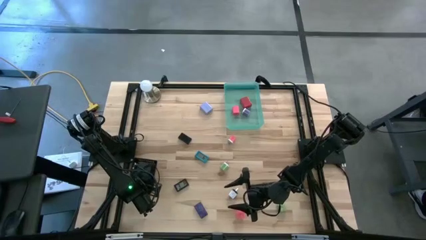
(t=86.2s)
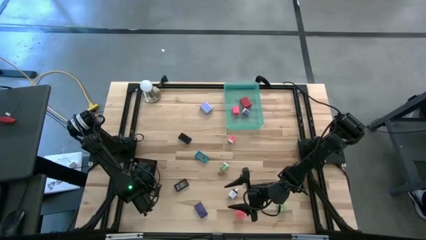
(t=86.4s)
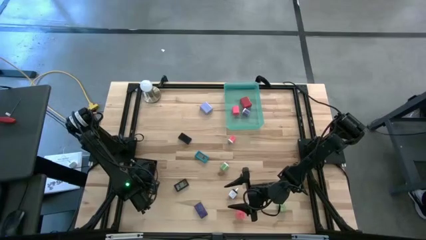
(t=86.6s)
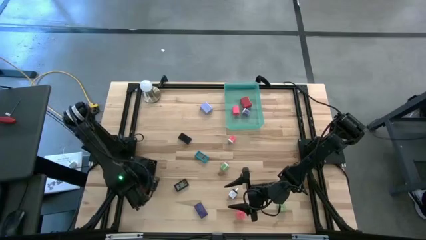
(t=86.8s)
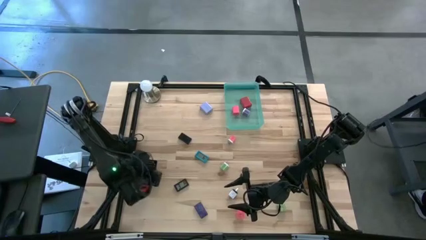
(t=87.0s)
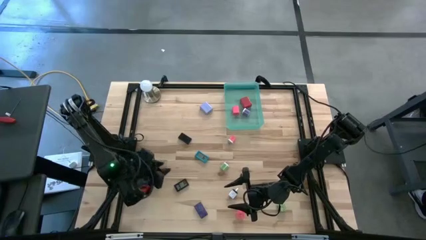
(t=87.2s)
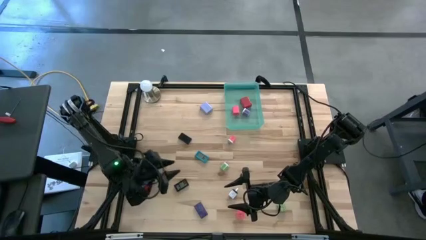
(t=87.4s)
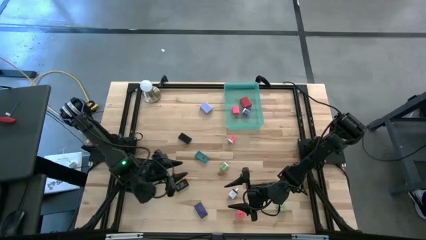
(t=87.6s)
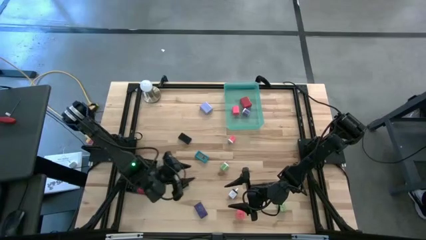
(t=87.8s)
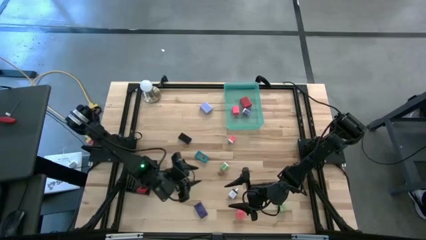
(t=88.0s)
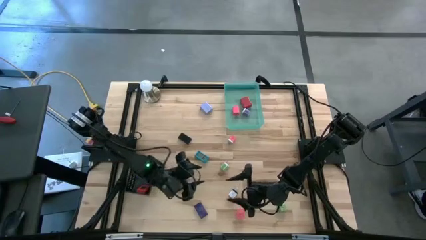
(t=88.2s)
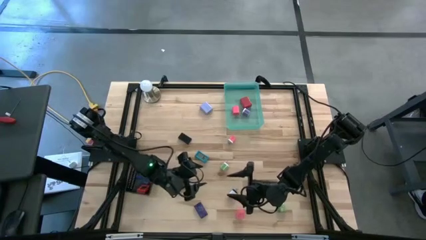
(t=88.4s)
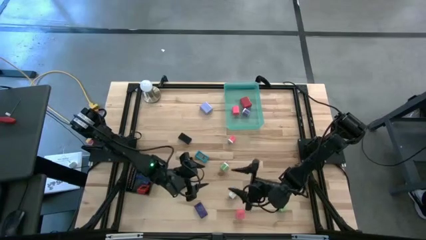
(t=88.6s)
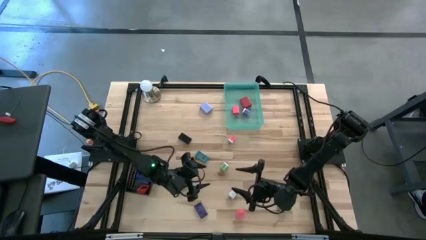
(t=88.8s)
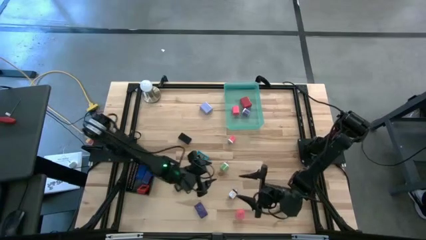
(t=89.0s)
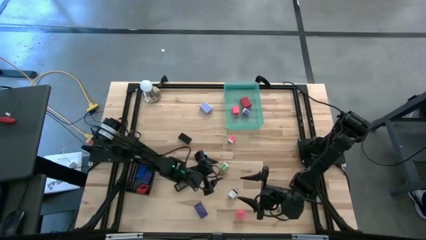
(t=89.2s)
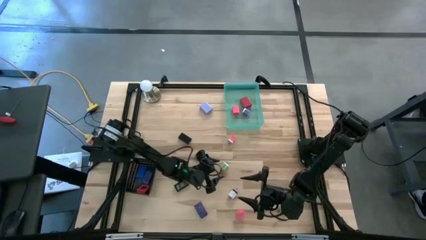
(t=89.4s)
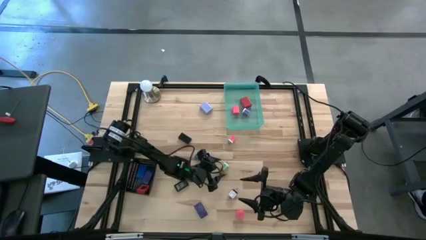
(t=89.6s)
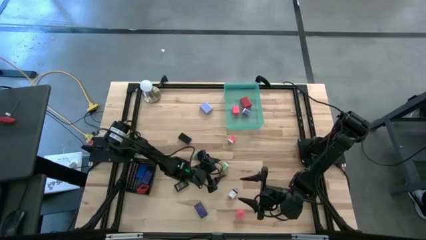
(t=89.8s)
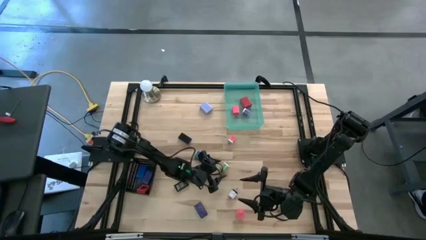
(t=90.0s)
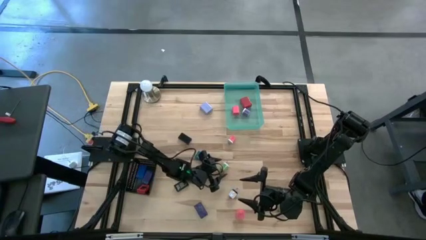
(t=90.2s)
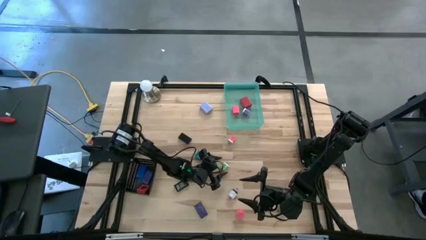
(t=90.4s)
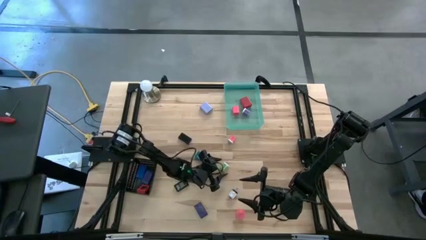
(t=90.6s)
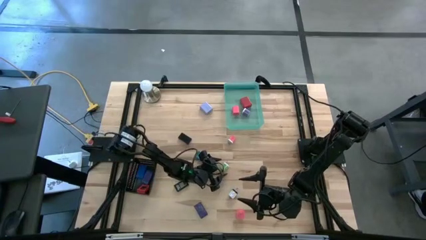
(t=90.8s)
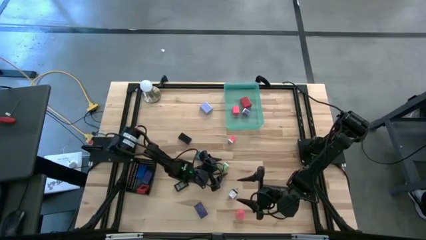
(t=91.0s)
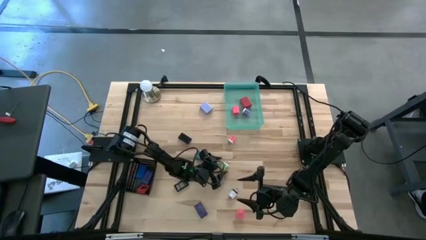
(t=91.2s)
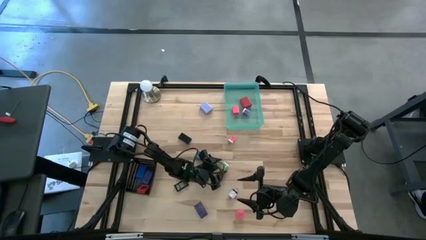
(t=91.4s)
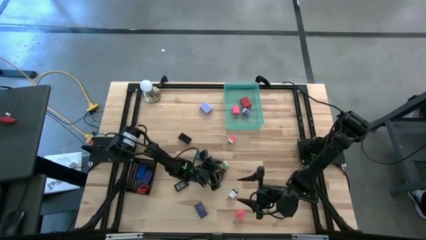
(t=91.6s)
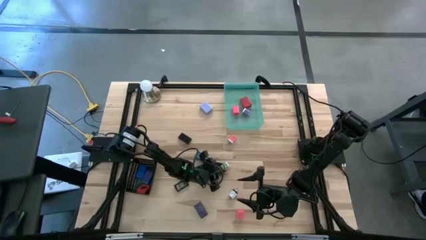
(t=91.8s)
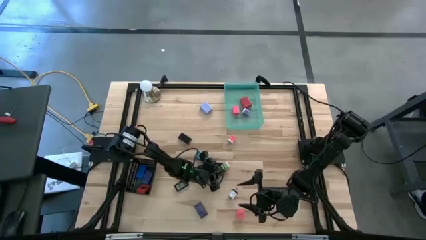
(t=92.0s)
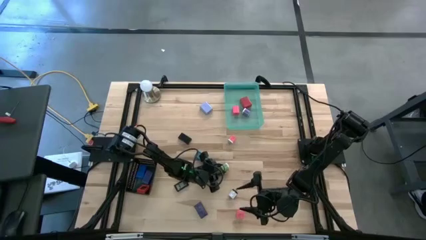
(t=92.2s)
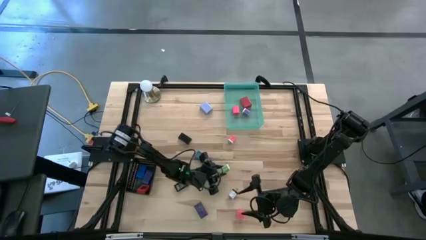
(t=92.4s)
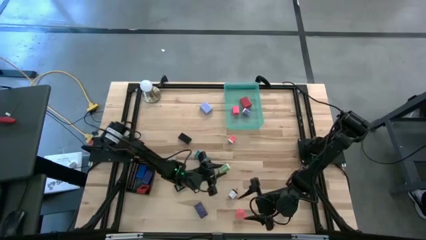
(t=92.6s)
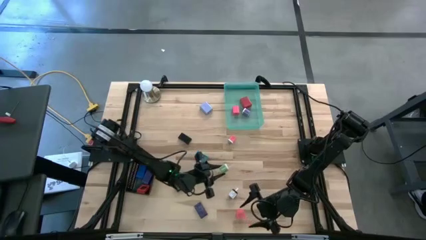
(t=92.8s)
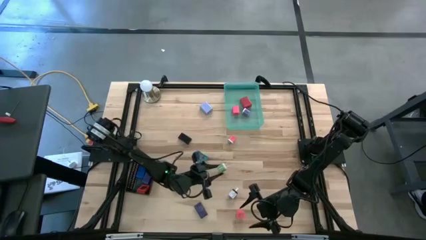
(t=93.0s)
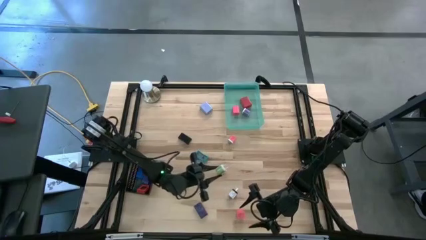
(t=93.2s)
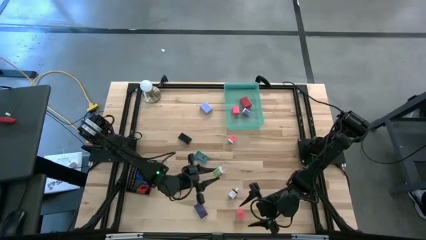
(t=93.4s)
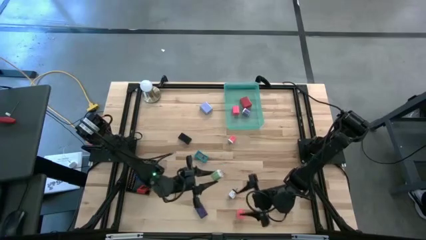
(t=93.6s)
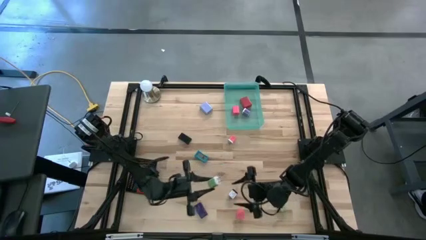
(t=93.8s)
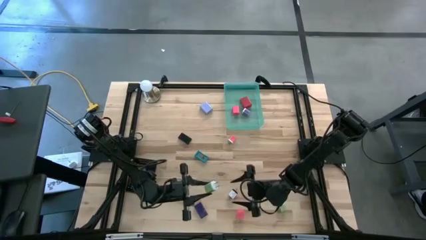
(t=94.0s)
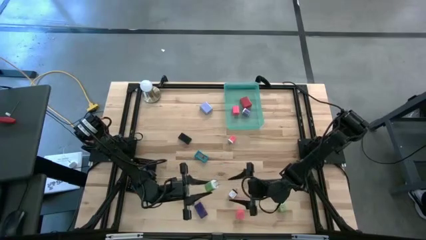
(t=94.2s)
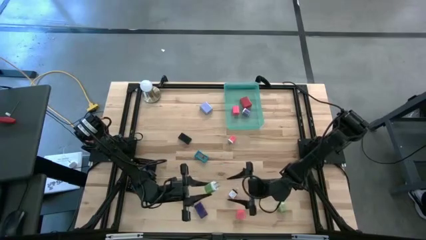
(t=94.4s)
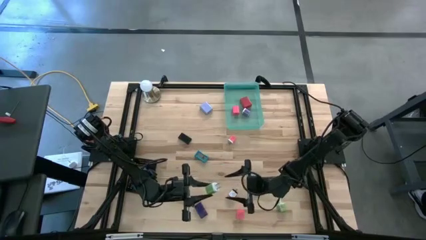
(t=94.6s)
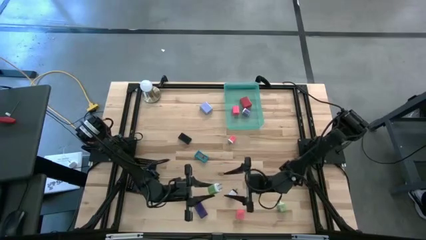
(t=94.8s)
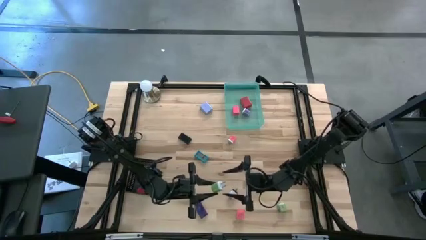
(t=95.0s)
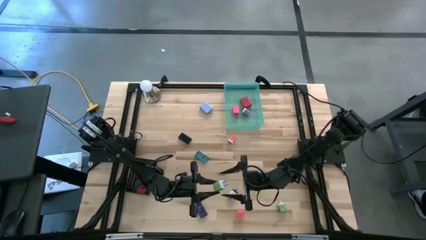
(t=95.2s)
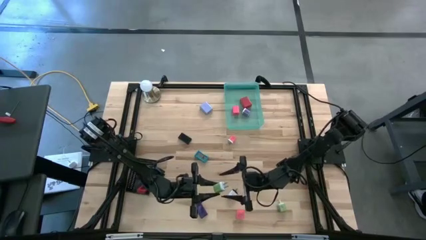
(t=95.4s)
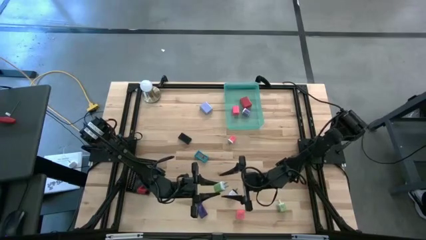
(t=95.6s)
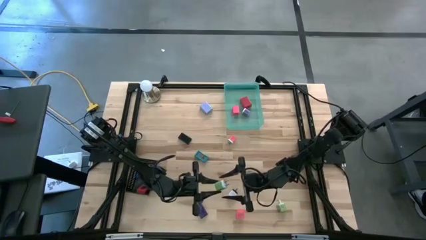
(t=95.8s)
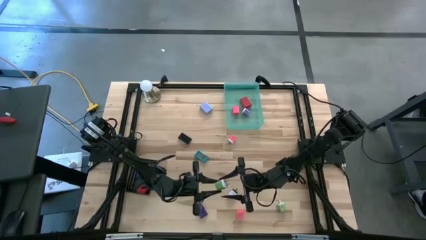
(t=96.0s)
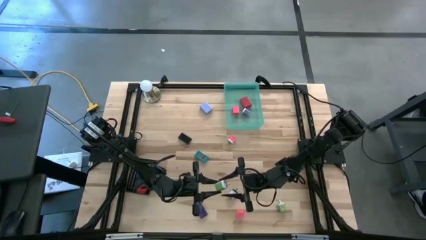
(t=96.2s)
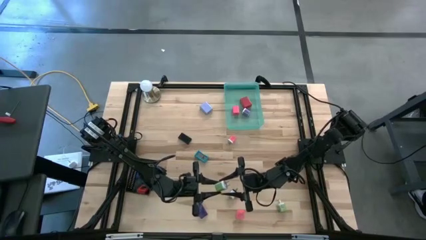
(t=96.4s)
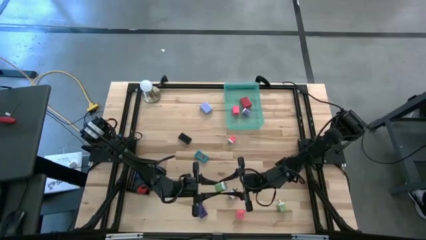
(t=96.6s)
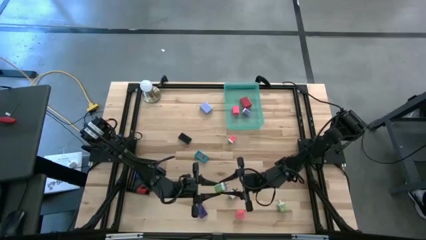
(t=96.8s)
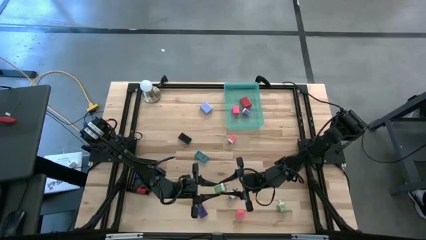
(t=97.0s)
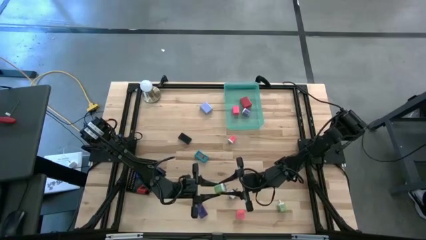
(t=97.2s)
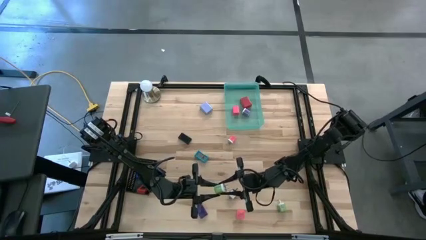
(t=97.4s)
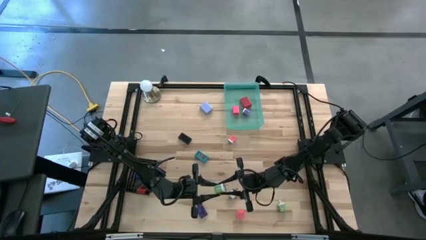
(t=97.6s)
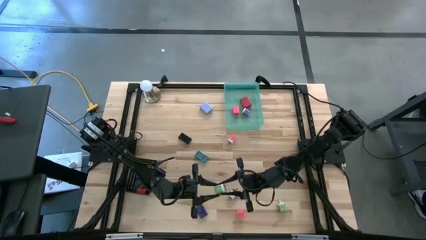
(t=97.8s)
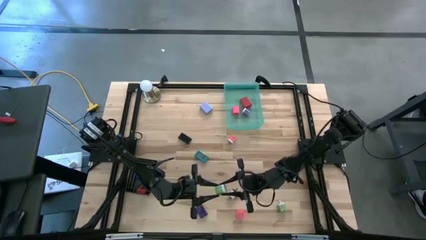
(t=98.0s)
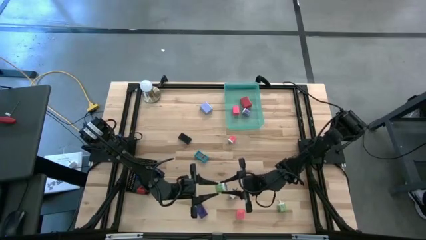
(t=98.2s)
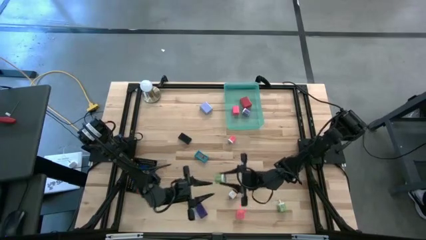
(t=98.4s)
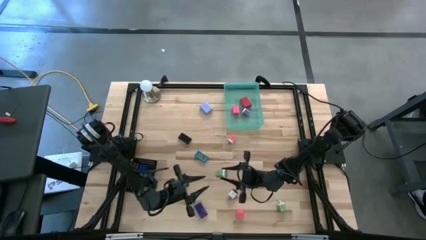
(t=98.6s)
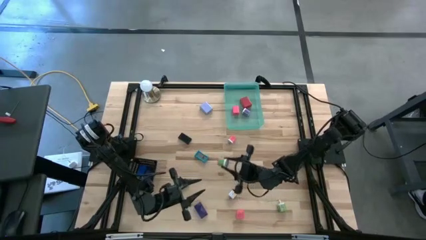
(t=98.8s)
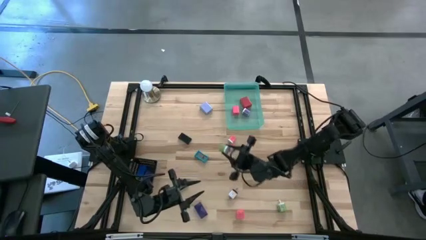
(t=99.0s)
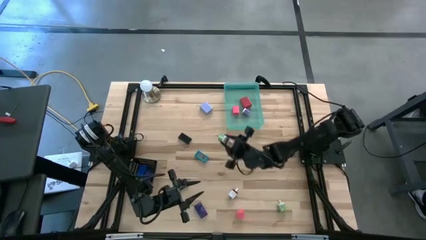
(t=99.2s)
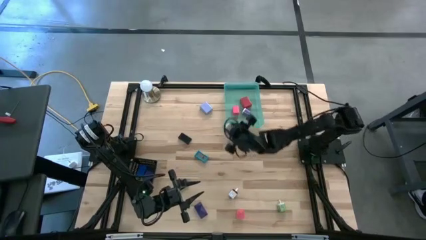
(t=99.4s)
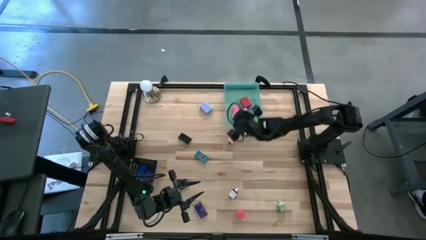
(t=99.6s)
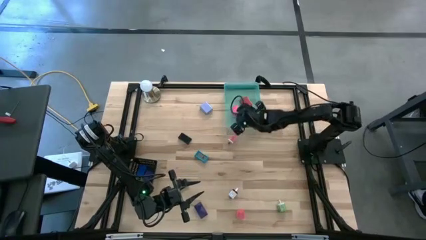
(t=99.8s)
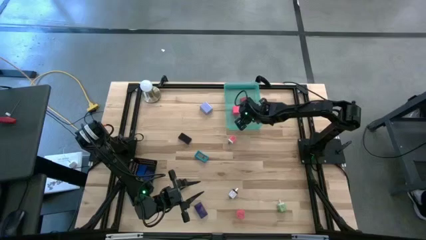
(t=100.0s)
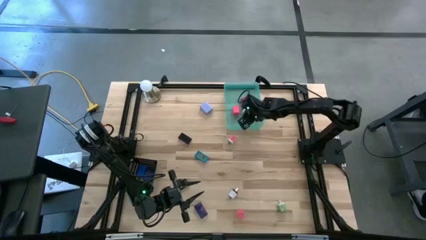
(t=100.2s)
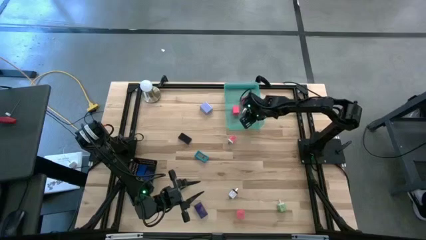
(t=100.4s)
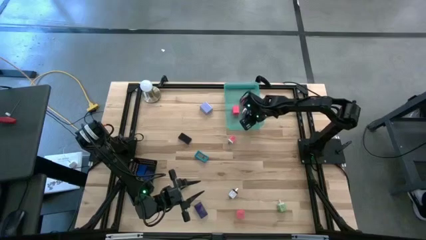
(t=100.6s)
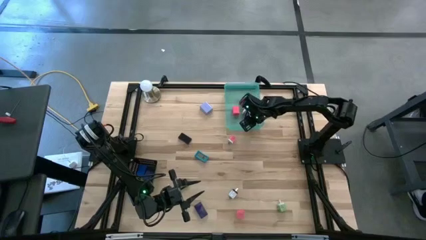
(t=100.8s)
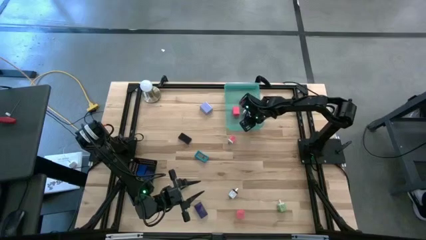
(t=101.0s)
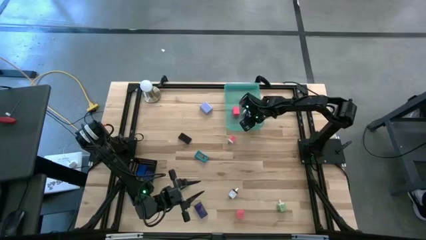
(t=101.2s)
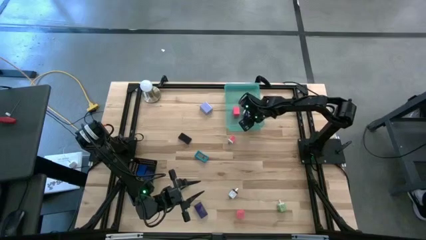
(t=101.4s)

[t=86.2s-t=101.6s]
Task: Pick & Place Office items
Put the top green charger adapter into the green bin
